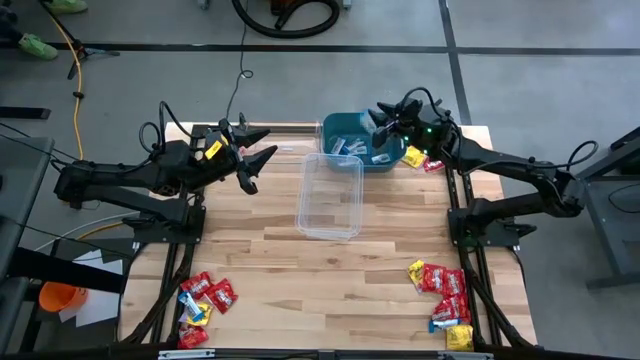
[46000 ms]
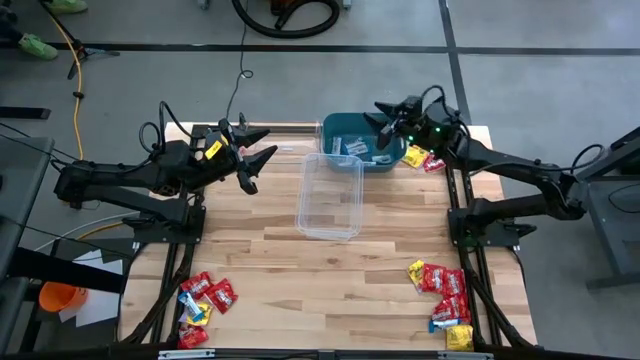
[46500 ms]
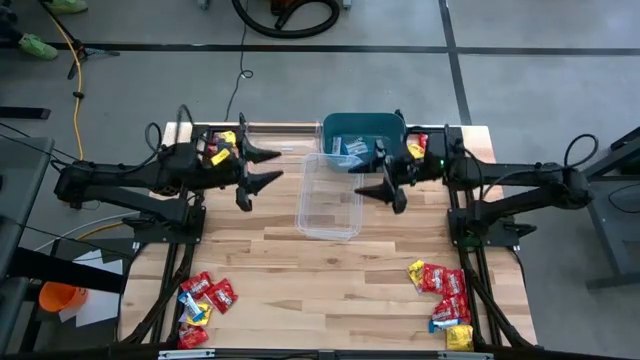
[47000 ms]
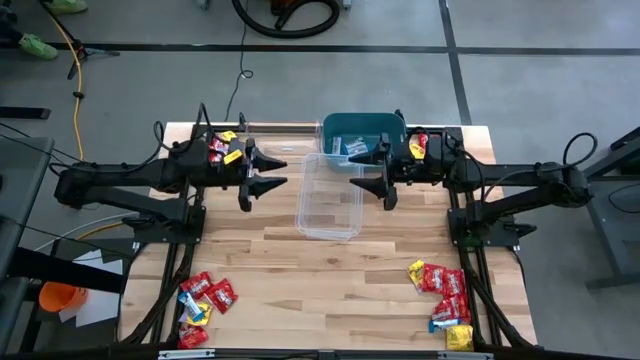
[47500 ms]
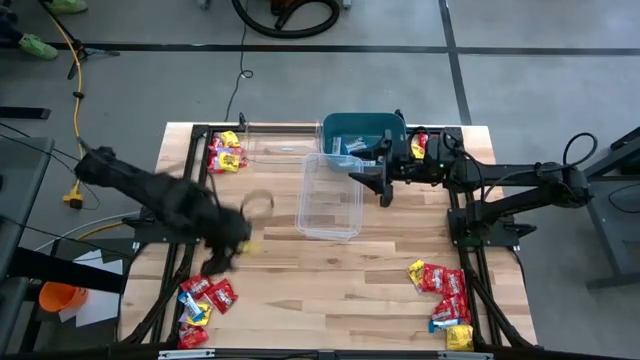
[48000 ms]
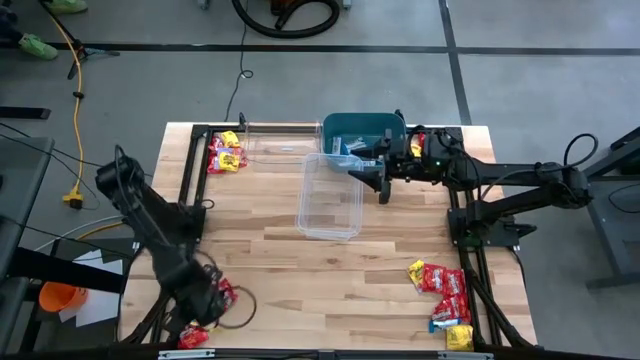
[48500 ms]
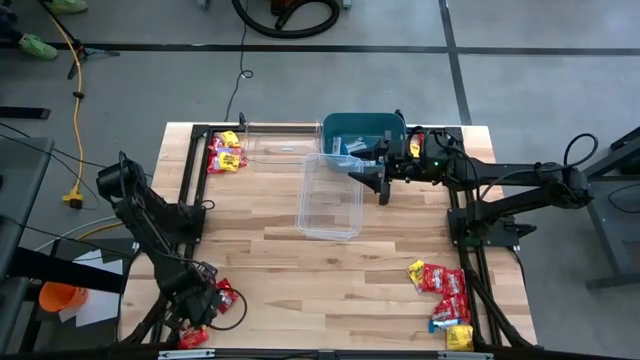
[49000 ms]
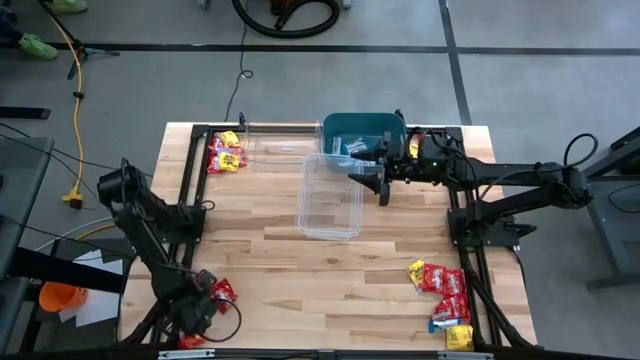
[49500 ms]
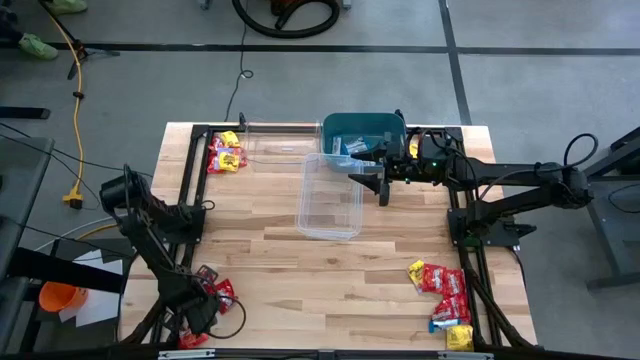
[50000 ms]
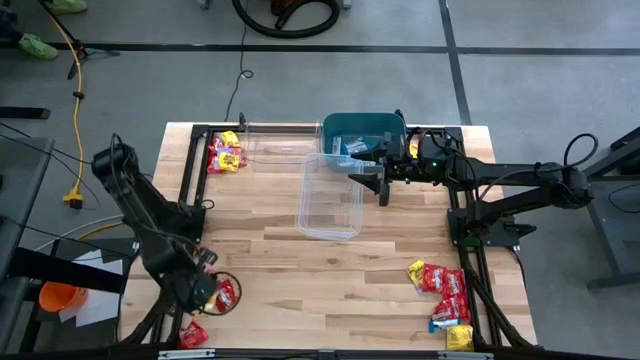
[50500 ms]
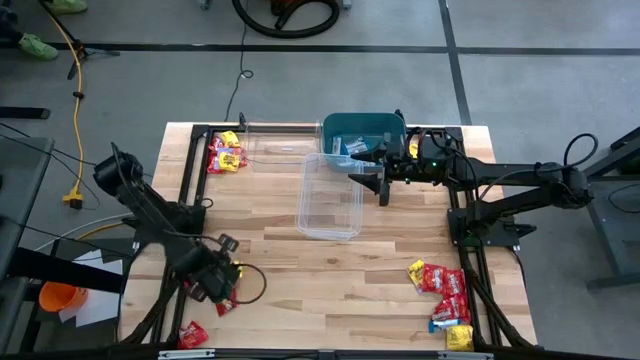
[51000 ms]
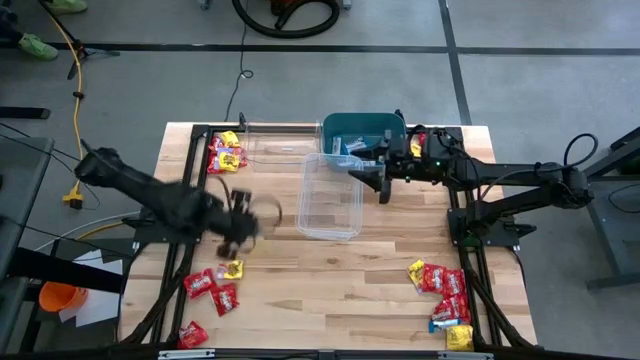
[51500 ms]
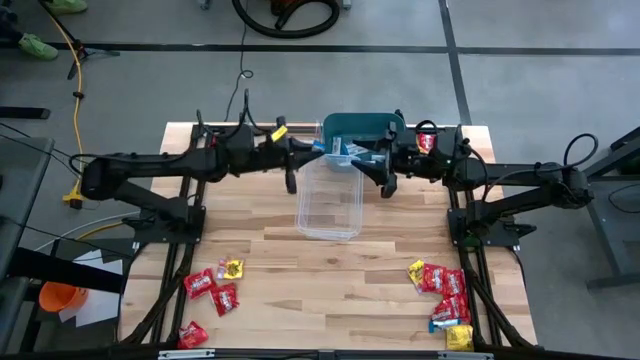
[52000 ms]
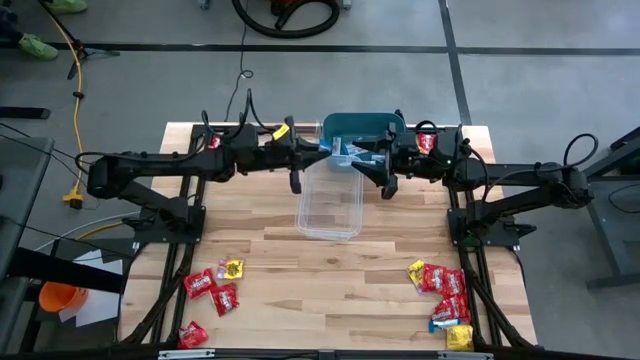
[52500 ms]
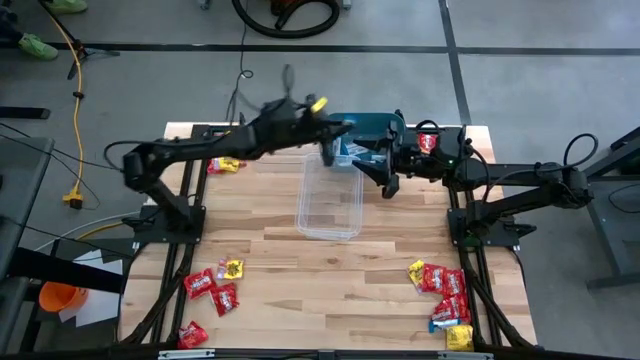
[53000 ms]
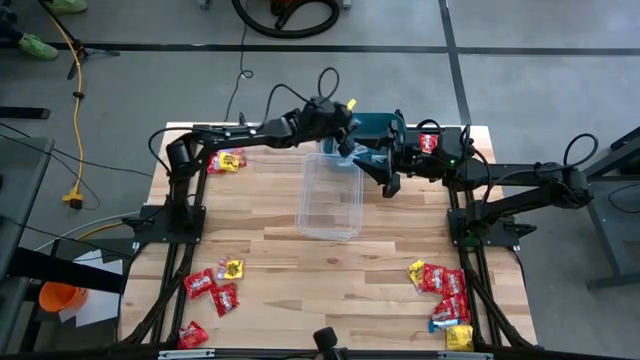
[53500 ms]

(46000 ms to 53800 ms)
Task: Sort candy
Put the white chocolate into the blue bin

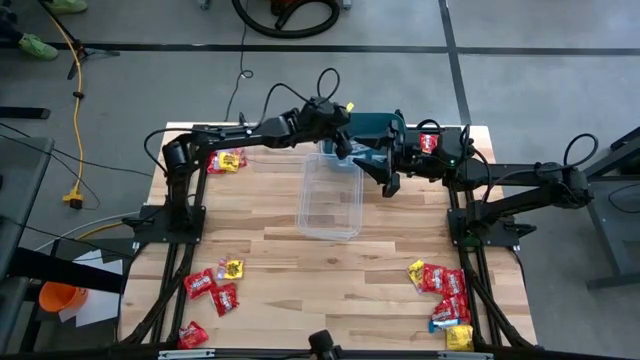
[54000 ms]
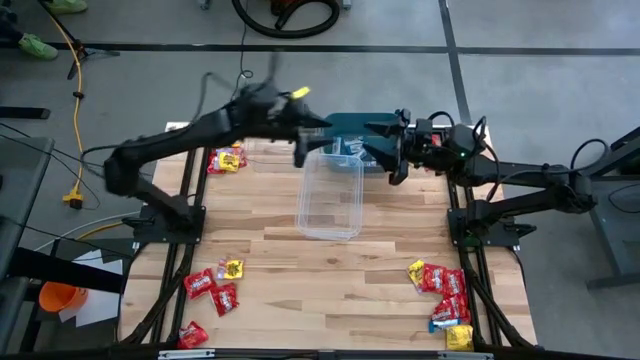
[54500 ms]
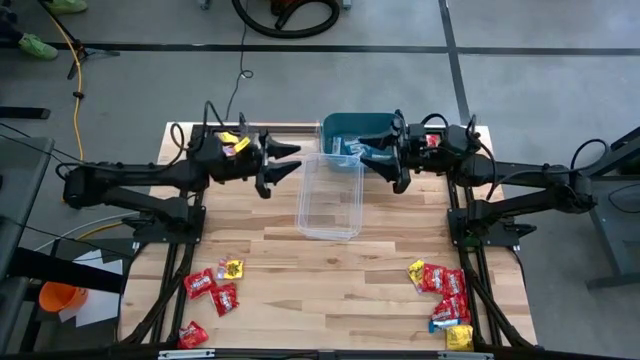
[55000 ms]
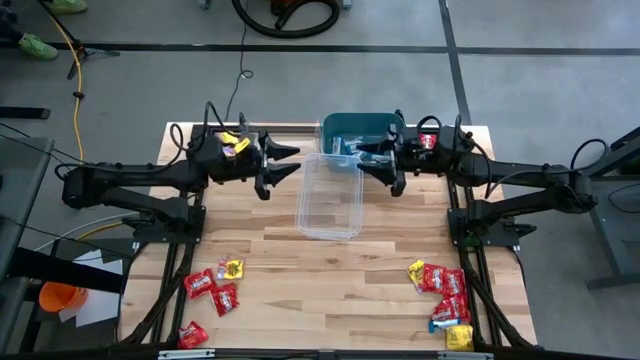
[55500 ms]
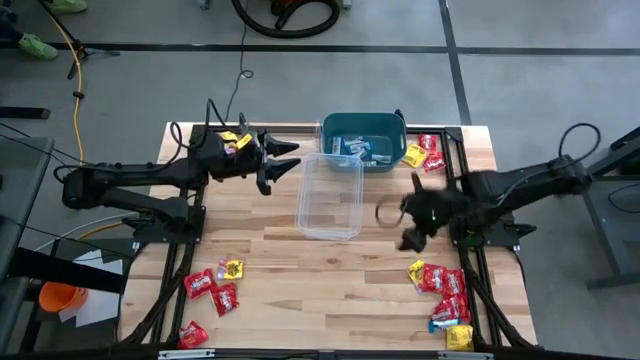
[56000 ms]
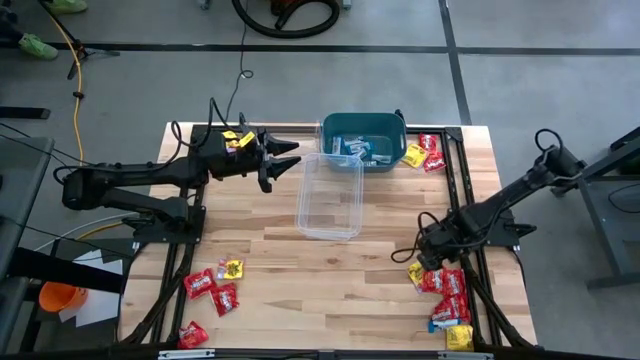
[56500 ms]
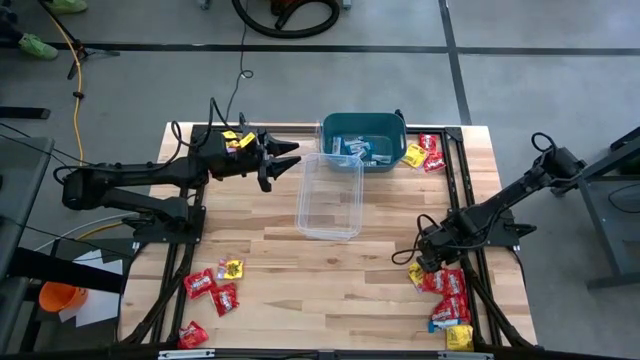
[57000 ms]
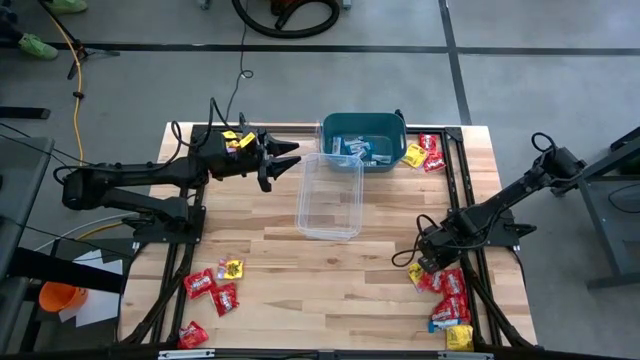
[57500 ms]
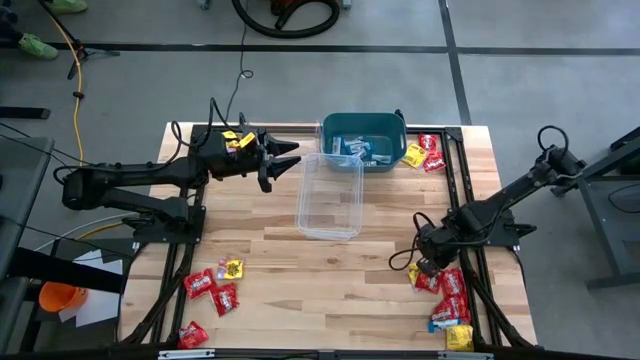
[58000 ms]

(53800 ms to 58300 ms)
Put the red candy into the transparent bin

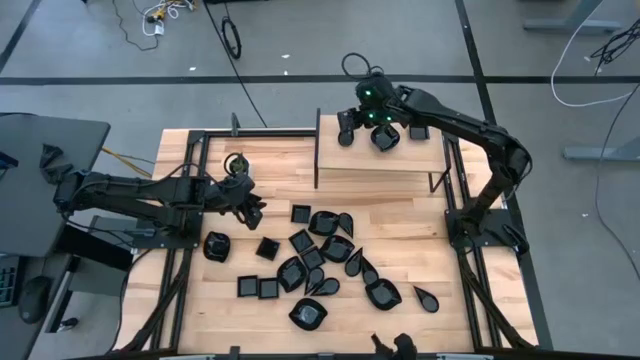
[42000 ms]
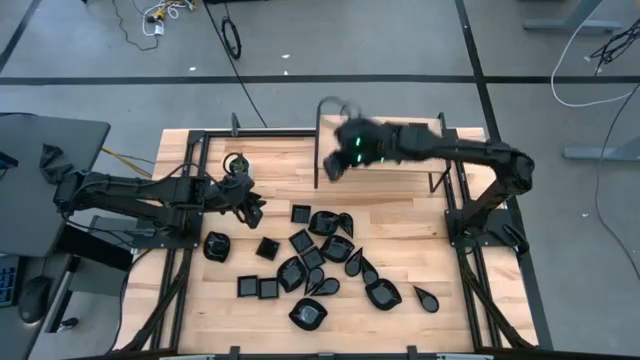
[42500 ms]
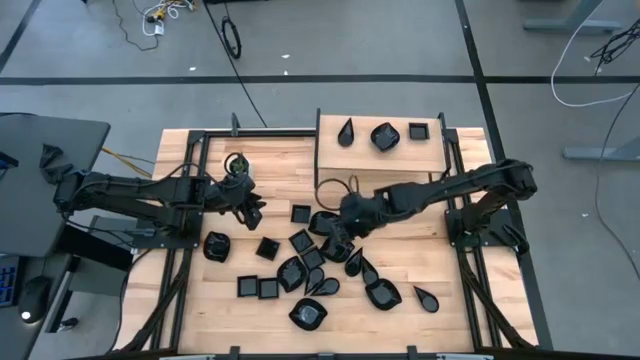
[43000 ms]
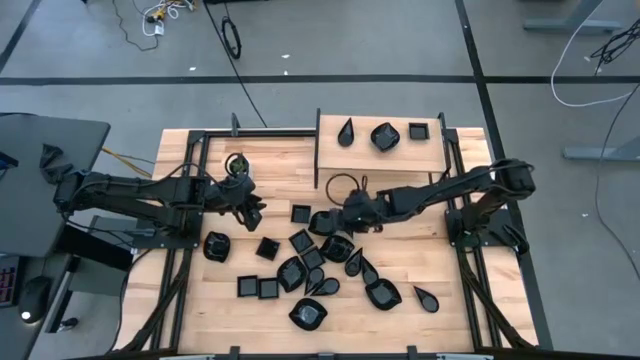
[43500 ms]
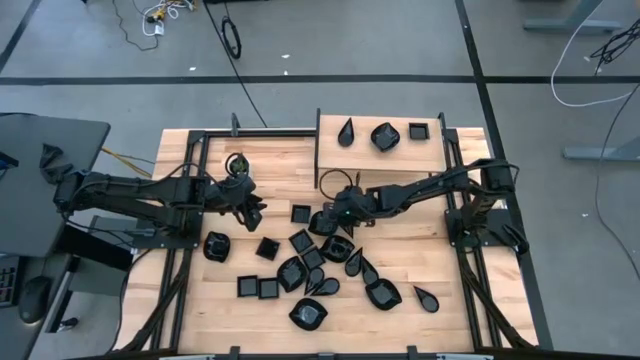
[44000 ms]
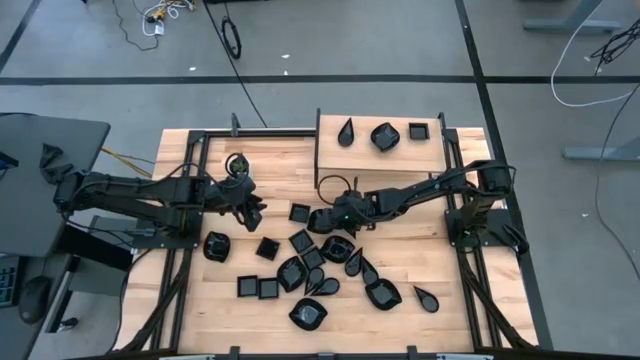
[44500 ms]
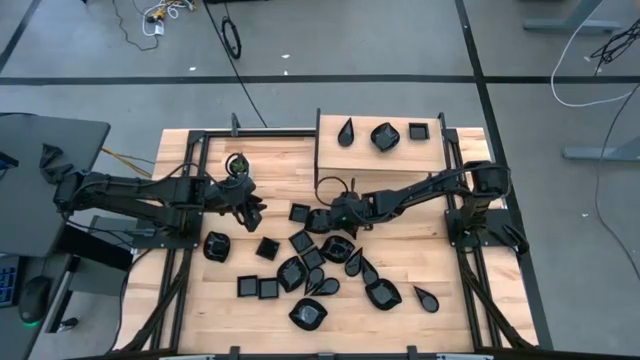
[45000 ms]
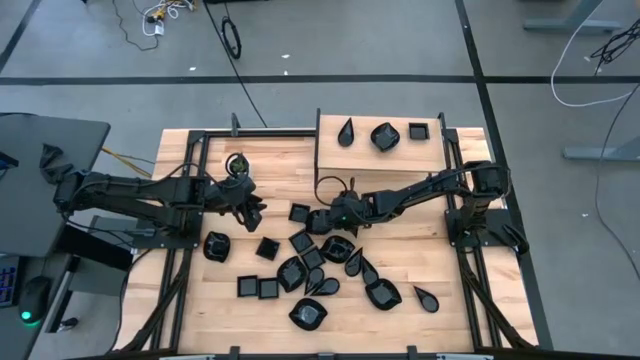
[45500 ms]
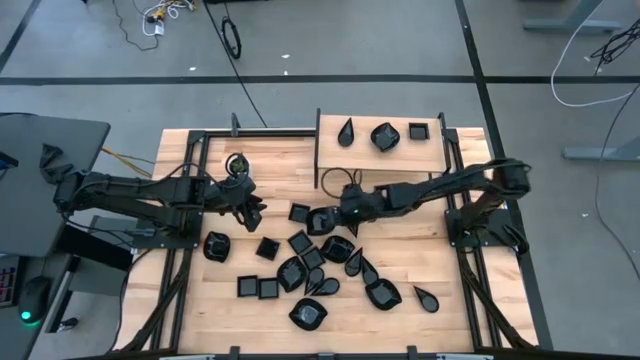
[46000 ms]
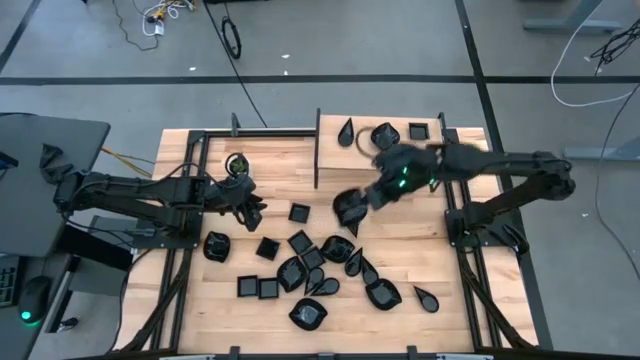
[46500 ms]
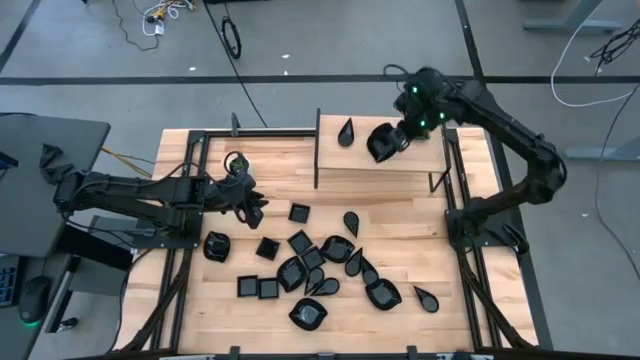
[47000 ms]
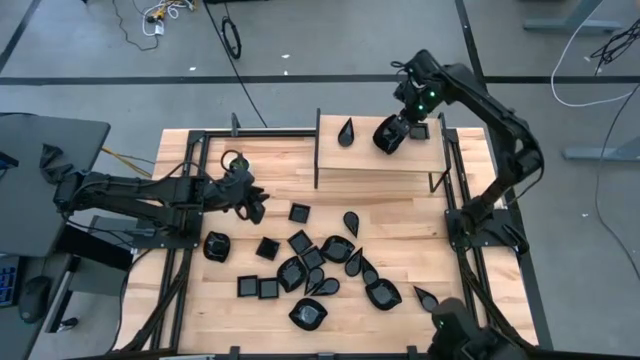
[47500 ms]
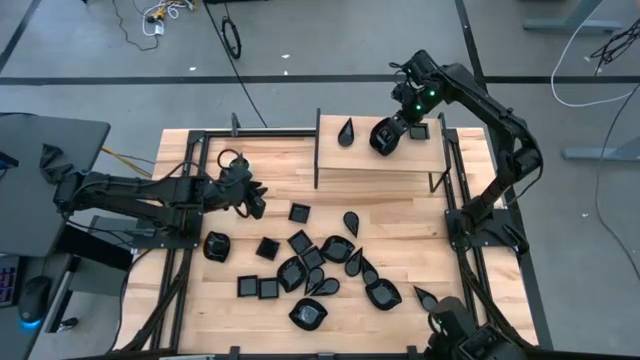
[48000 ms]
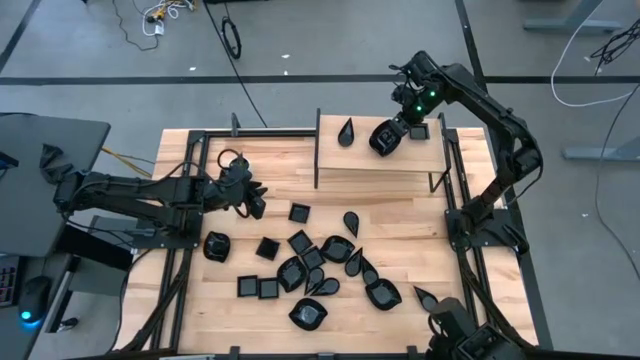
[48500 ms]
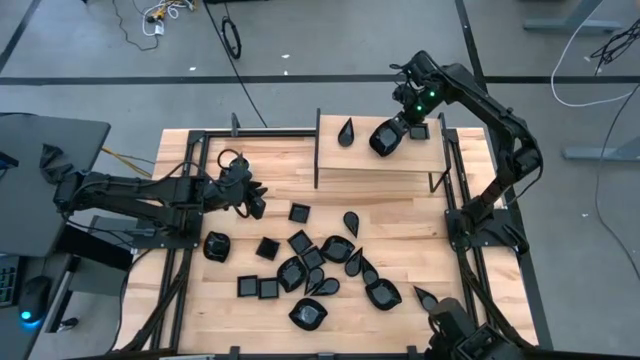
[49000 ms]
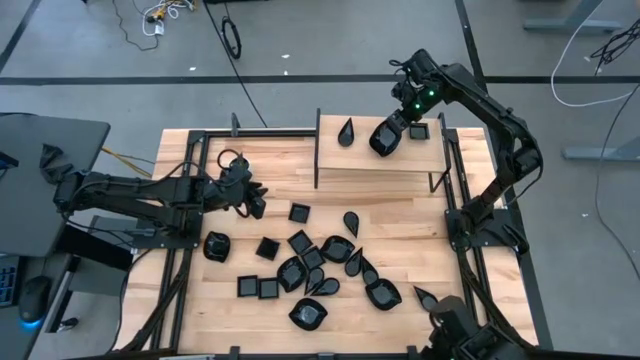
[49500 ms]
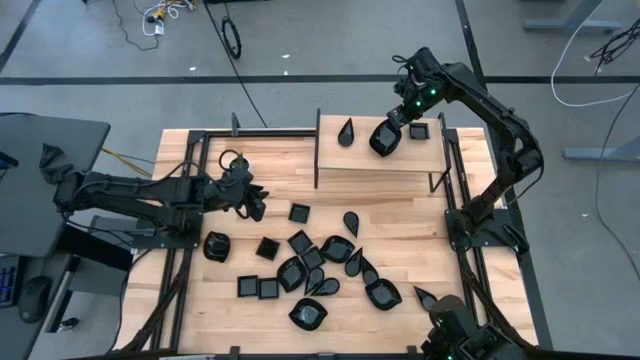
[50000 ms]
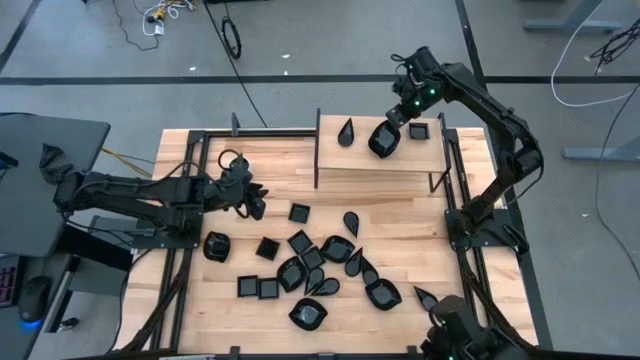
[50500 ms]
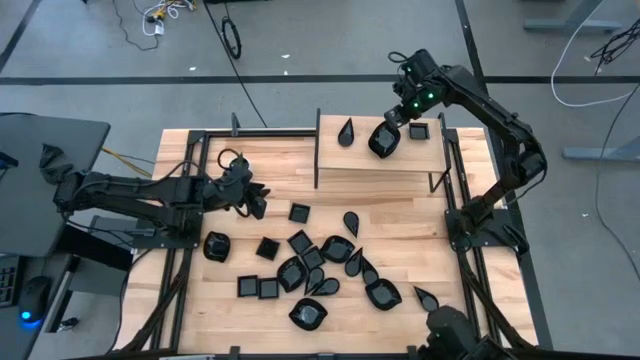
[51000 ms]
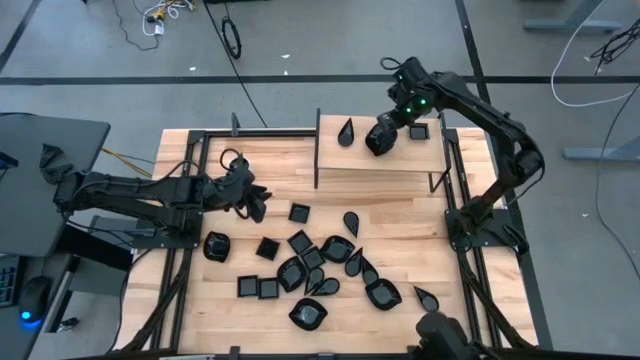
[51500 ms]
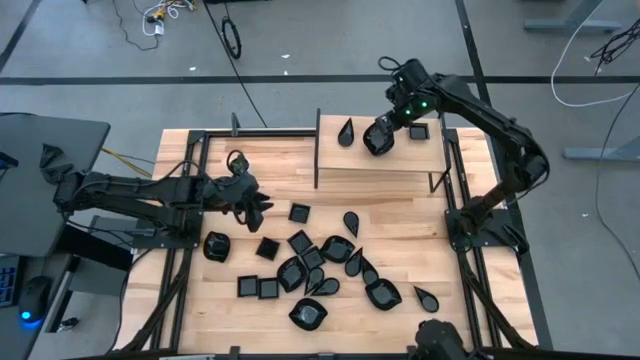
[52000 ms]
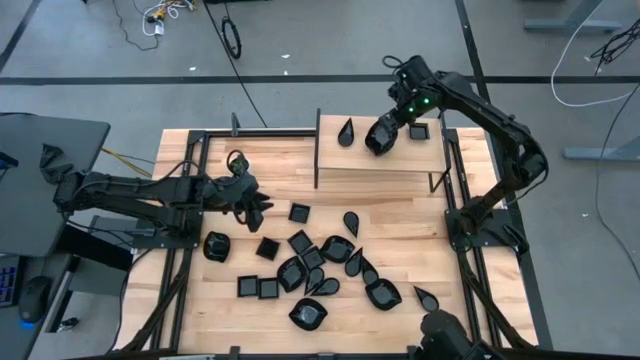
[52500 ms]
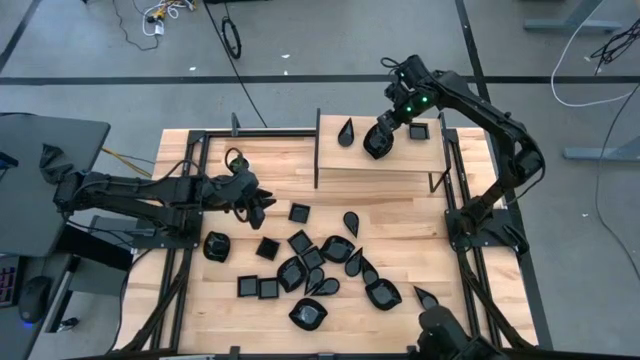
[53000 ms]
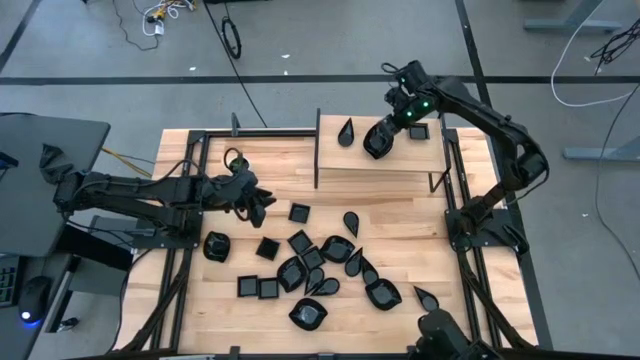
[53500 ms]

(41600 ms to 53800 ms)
Task: Pick & Place Mini shaped plates
Stack the leaf-shaped plate on top of the leaf-shaped plate on the shelf
